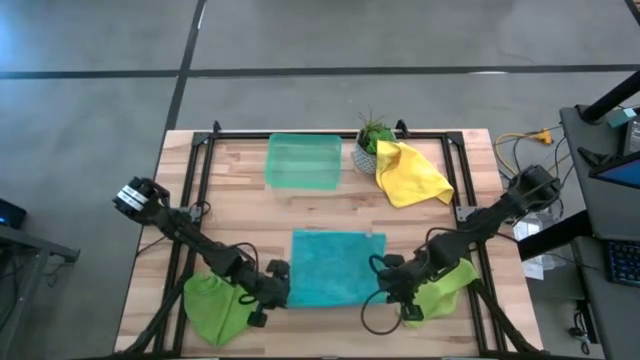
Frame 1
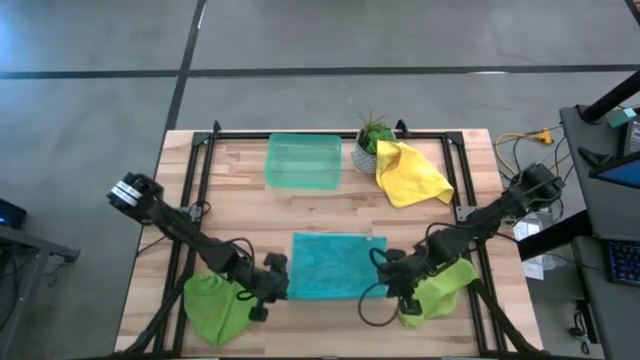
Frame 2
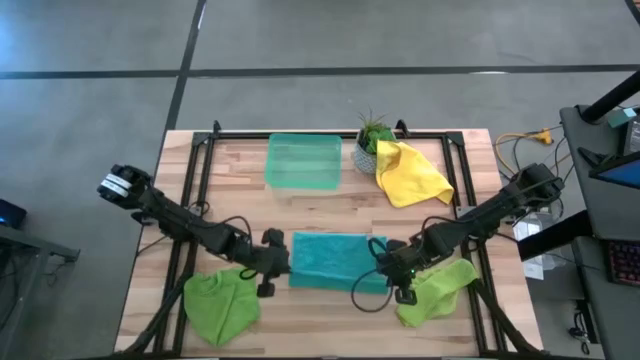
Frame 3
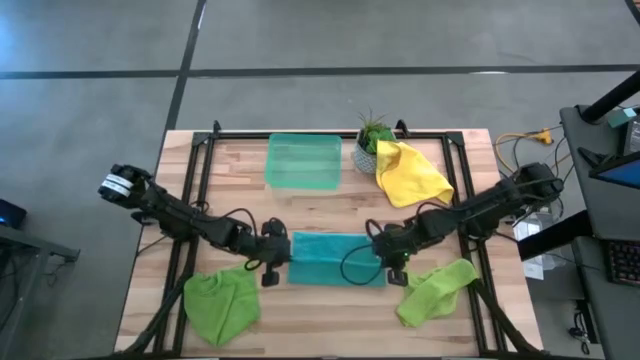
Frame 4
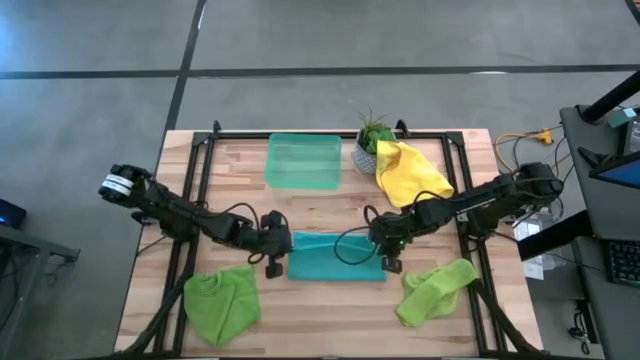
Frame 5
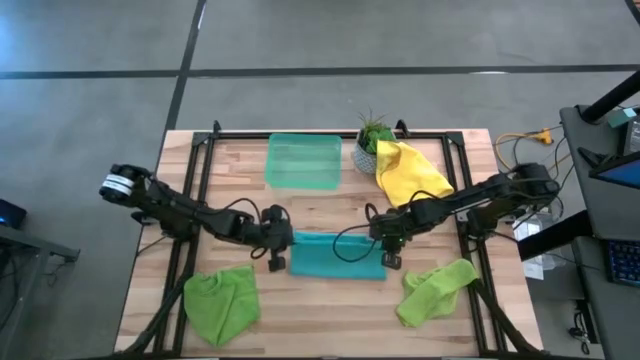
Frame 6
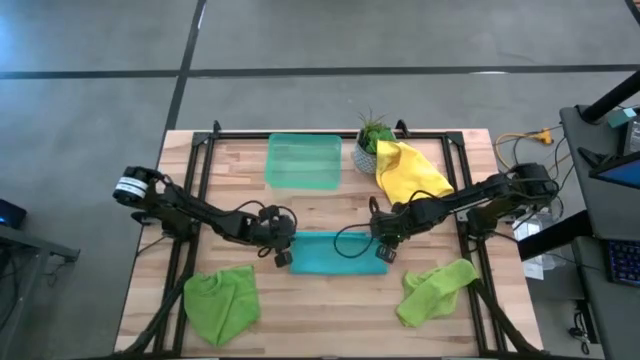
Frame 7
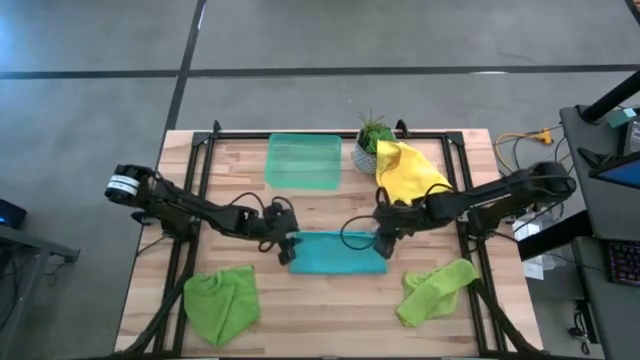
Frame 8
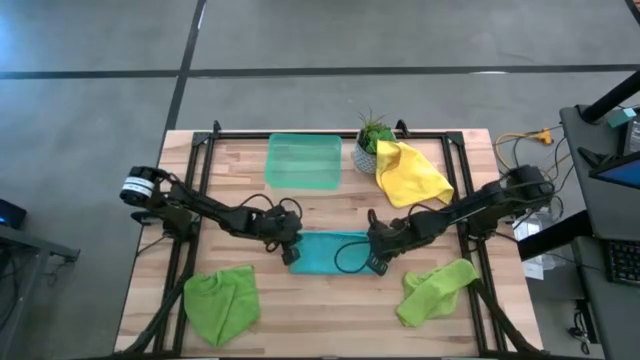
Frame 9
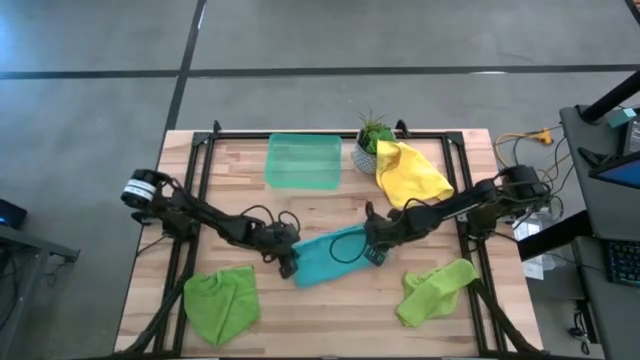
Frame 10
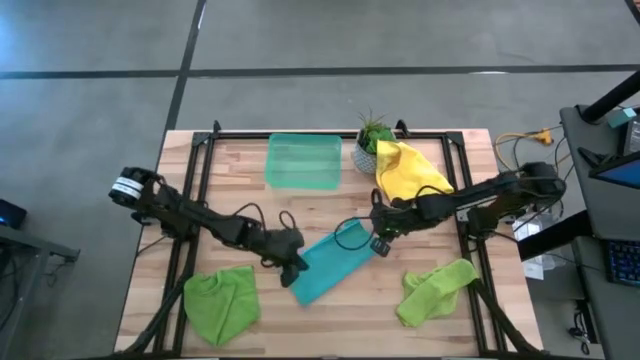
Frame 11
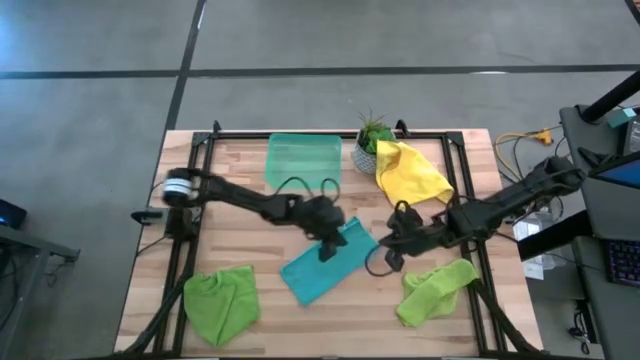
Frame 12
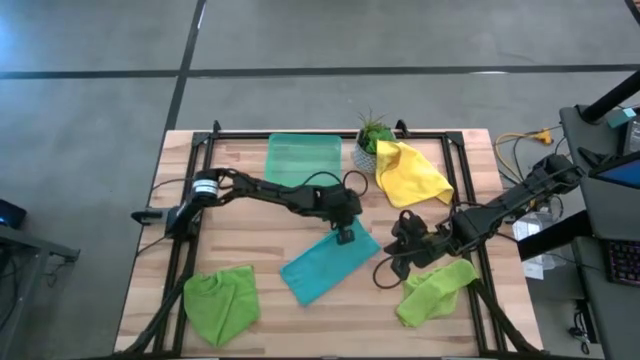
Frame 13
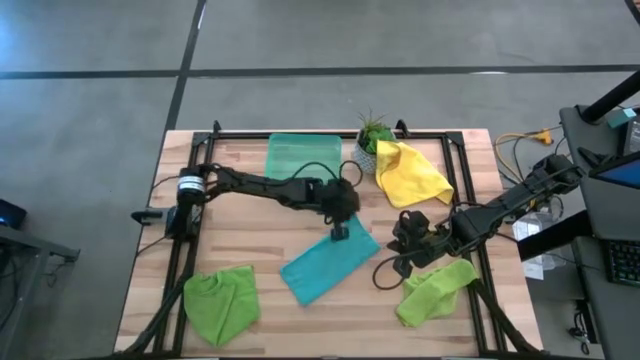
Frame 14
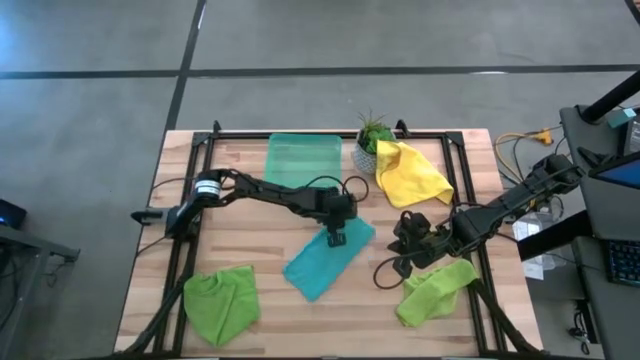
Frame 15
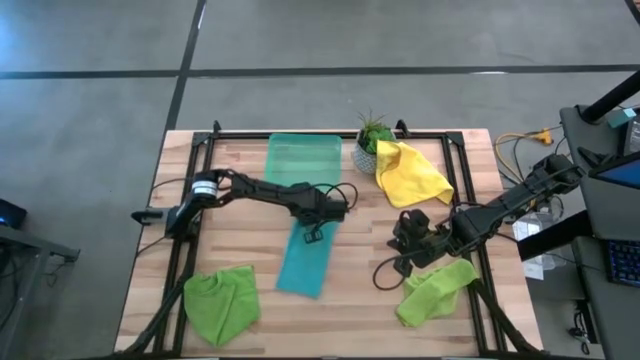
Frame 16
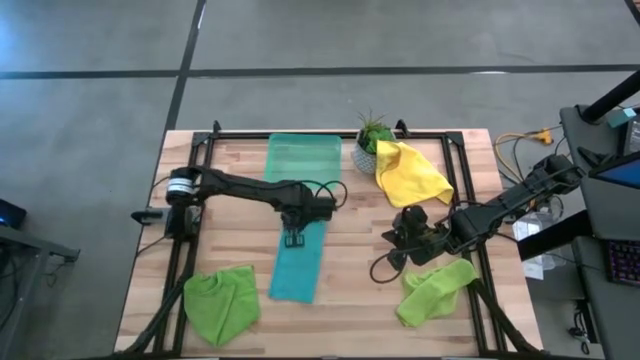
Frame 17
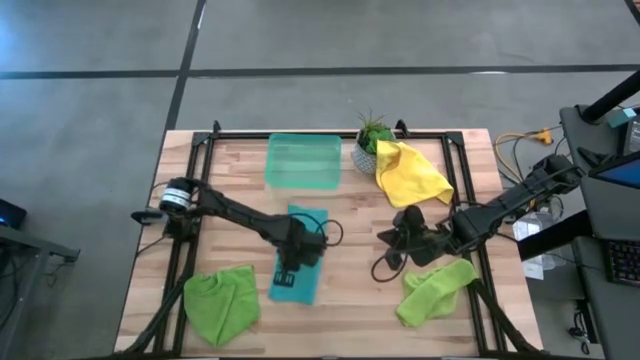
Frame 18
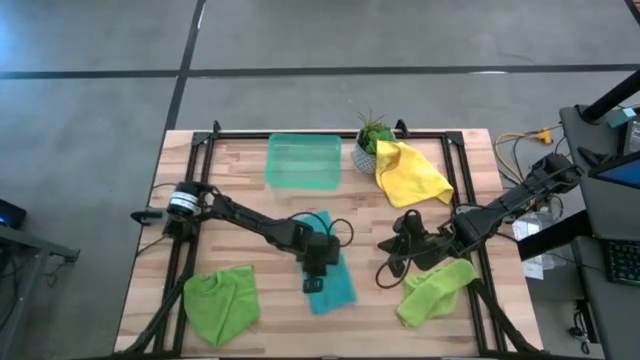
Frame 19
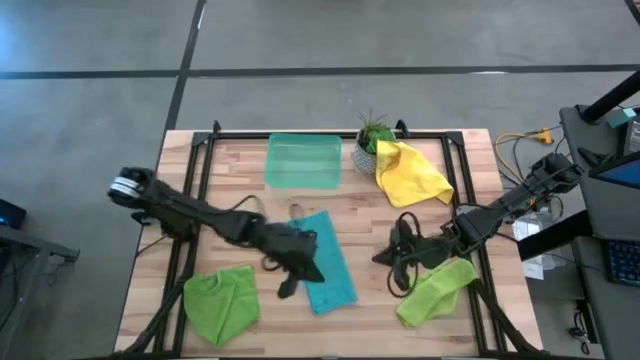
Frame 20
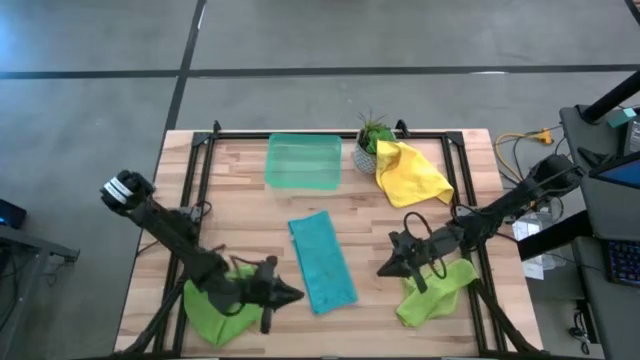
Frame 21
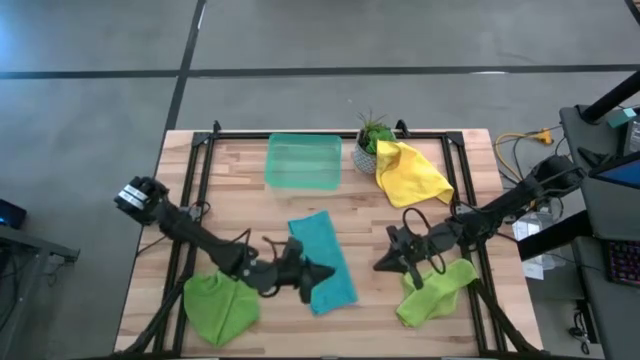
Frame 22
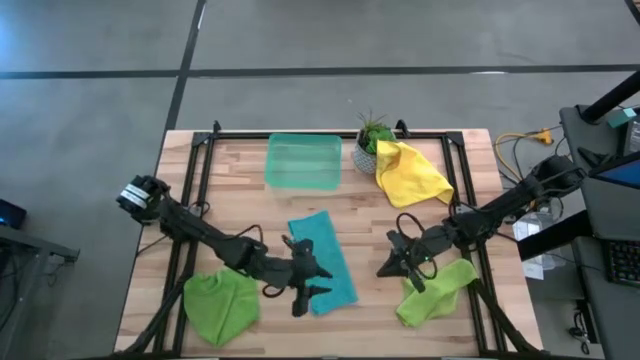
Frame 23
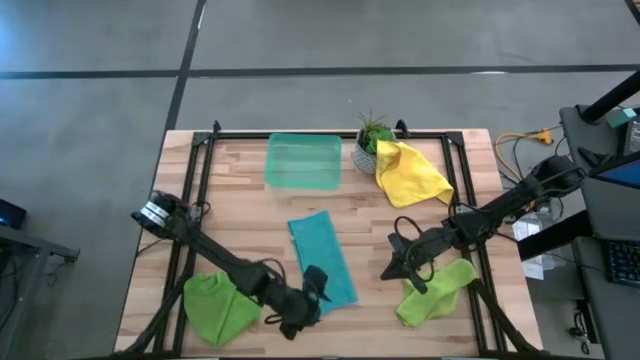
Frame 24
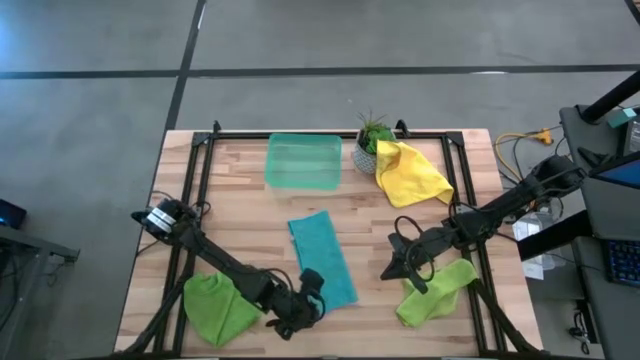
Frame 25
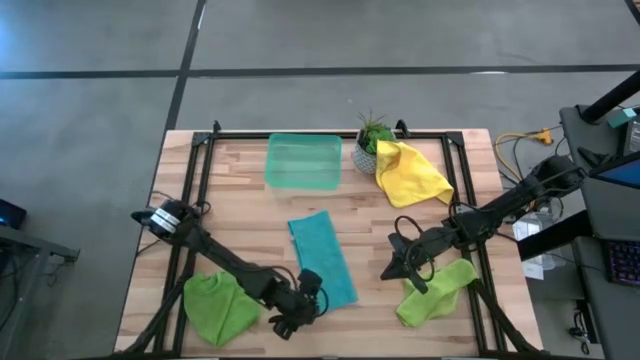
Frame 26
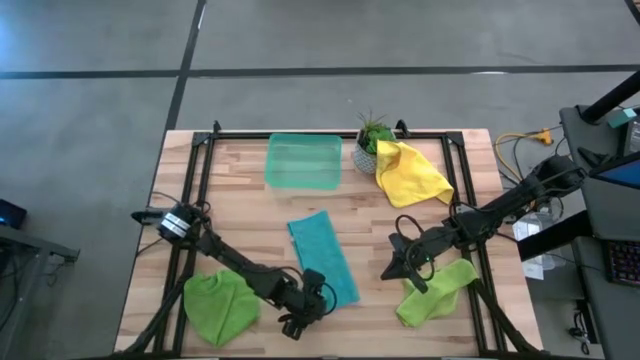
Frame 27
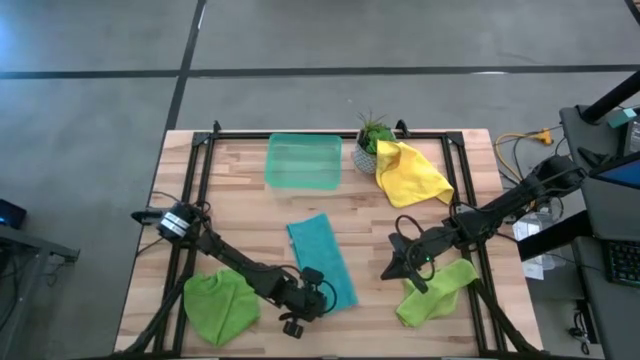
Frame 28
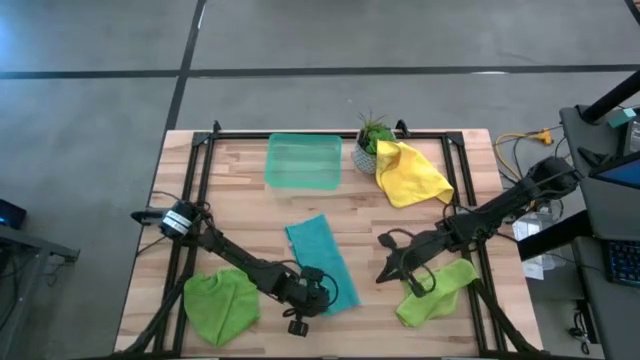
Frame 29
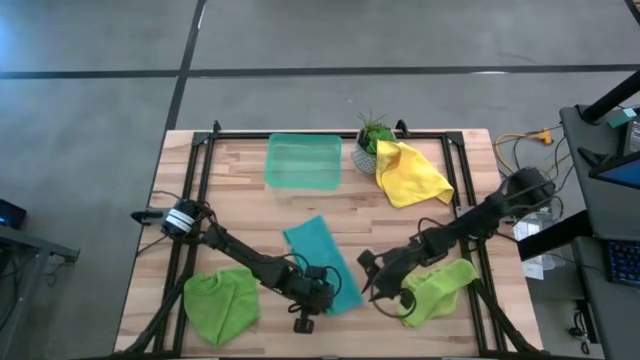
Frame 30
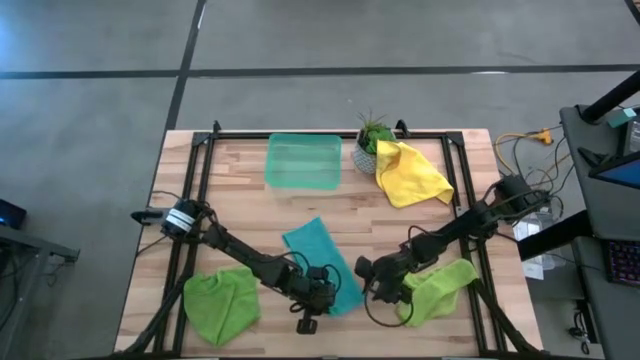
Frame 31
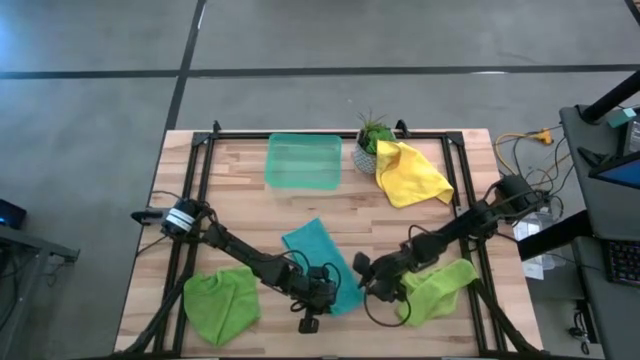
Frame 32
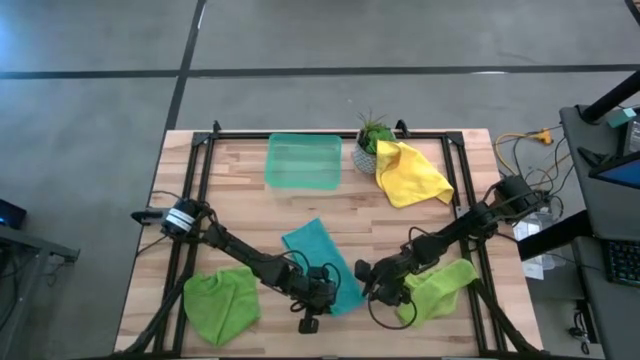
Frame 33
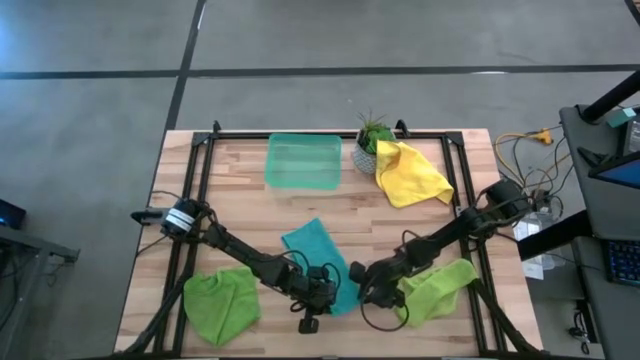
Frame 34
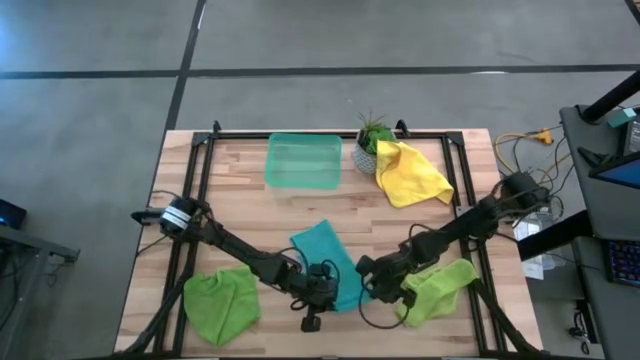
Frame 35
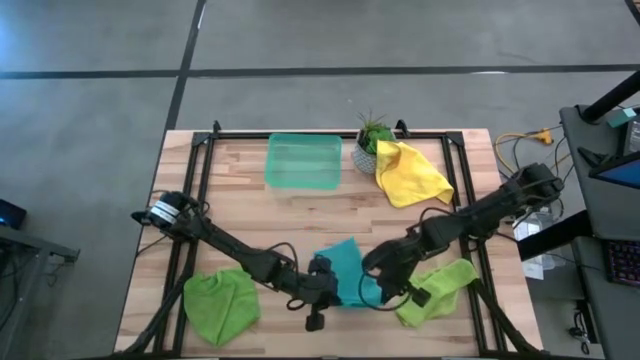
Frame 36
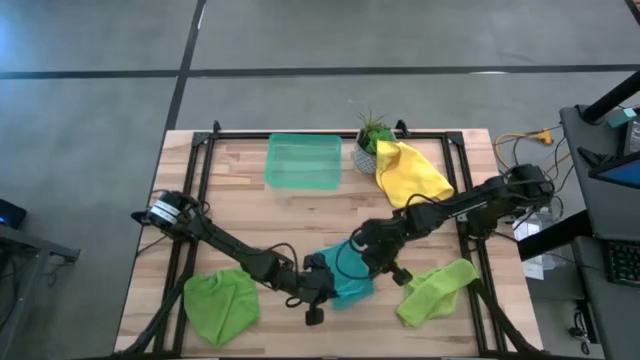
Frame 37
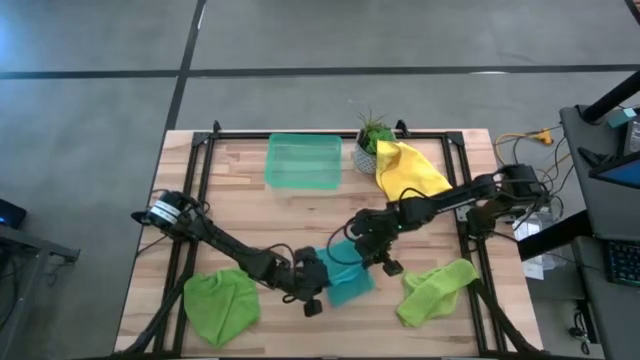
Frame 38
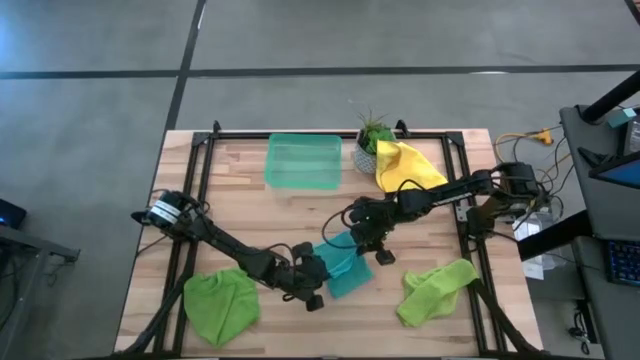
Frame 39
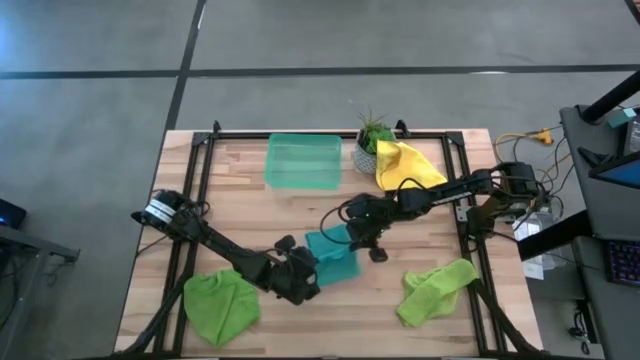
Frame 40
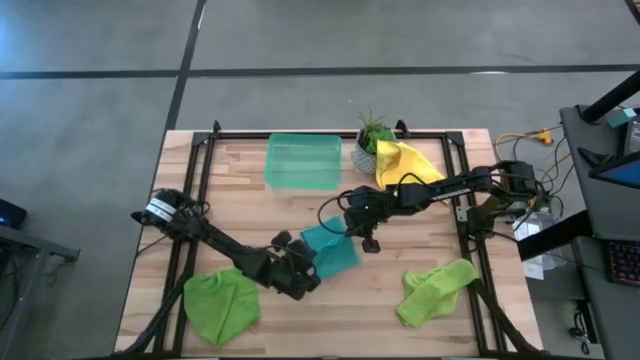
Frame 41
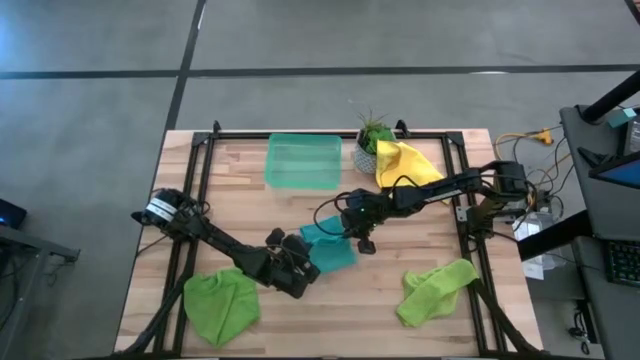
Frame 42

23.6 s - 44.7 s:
Task: Fold microfiber towels
Fold the blue microfiber towel
